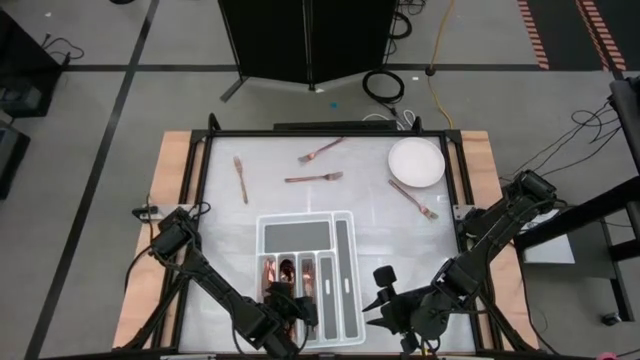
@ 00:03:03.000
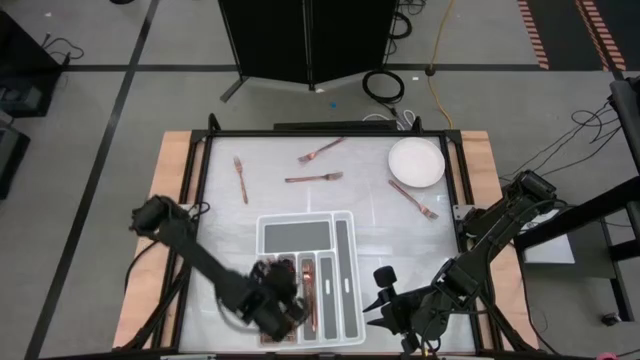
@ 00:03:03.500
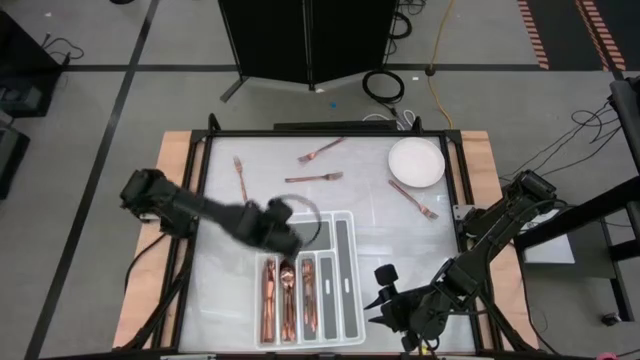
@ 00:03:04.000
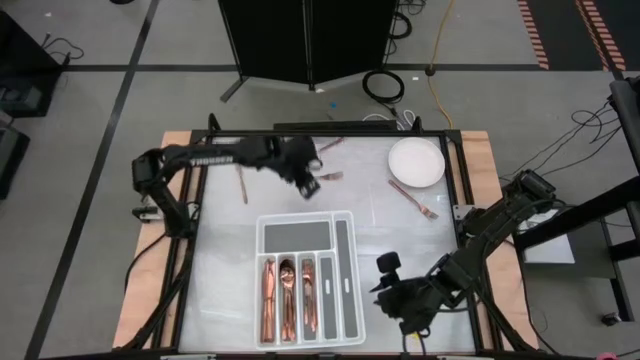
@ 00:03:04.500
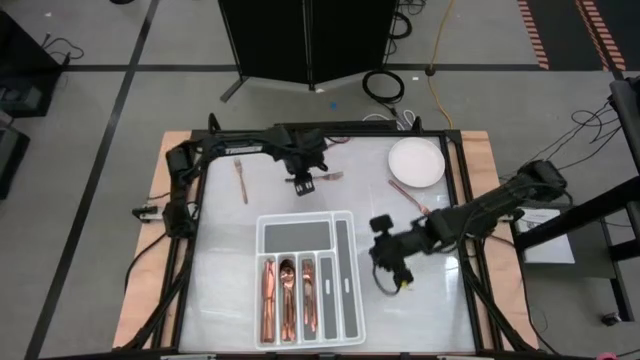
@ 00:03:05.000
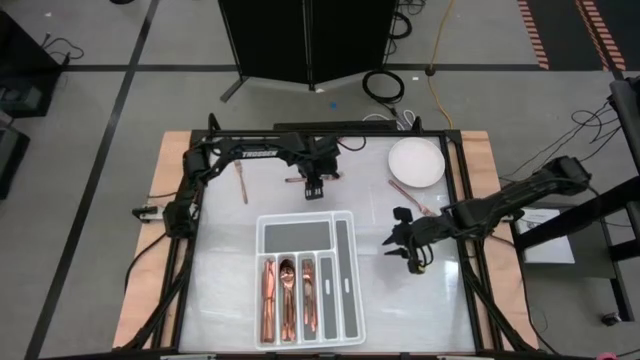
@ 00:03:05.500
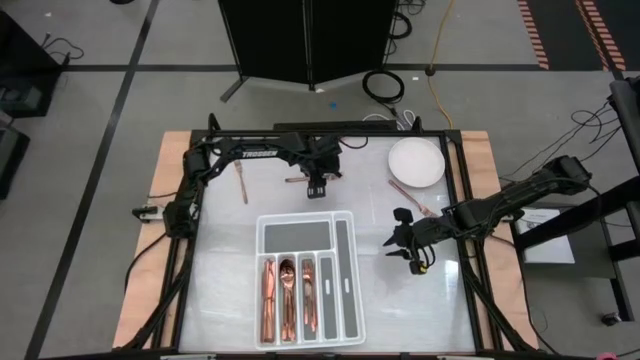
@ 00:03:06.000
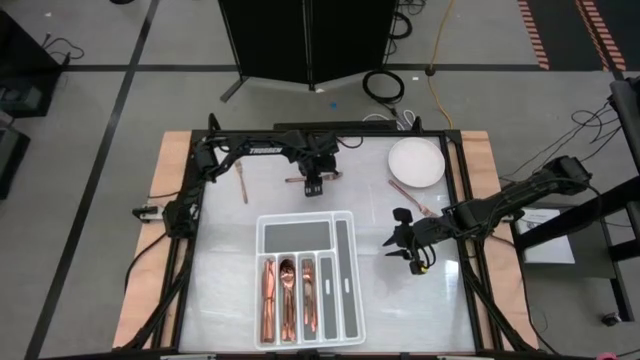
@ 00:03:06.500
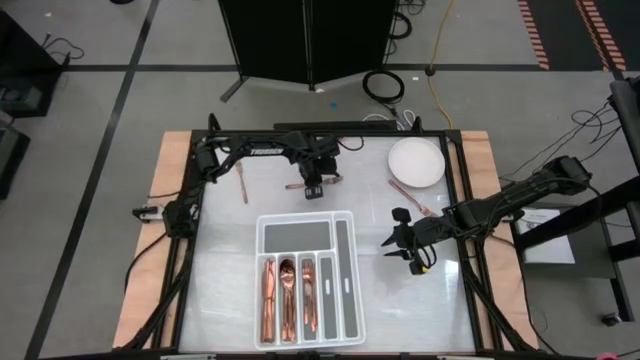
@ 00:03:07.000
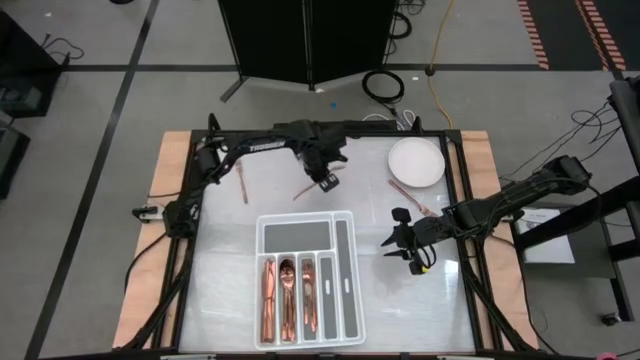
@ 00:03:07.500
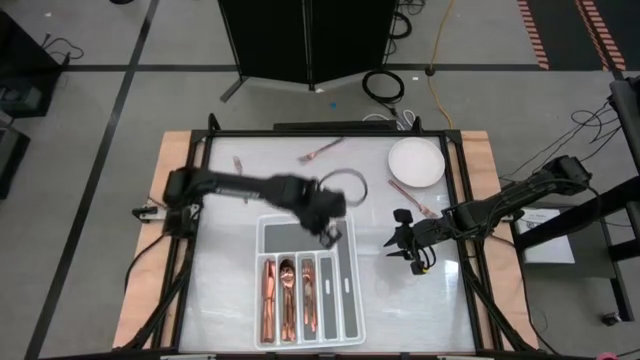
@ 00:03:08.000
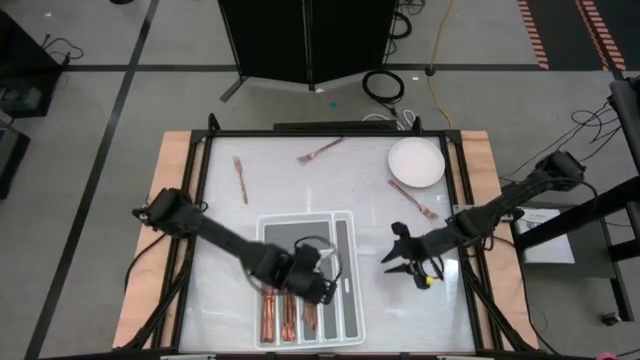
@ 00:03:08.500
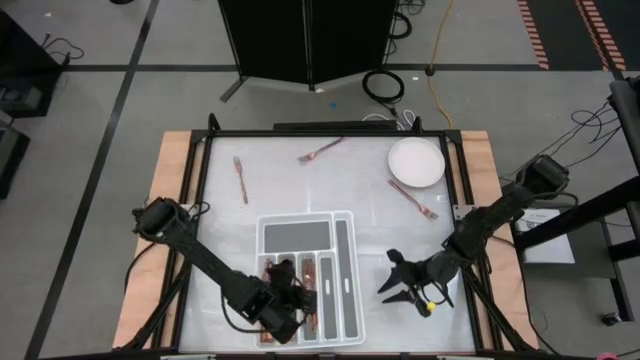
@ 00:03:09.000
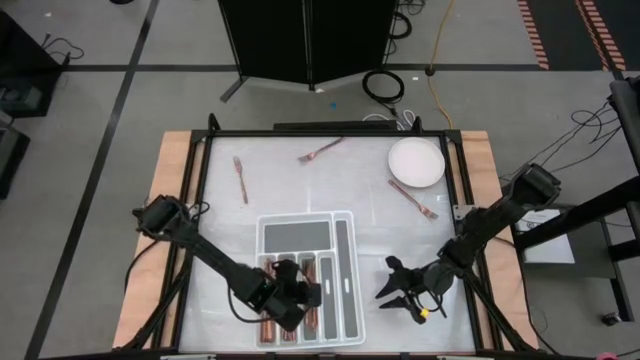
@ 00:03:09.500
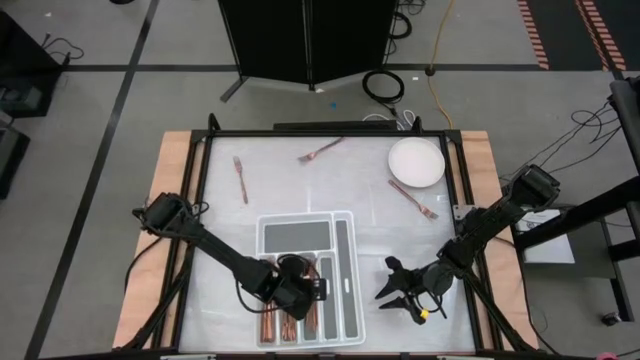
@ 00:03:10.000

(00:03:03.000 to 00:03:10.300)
Task: Sort silverware
Put the fork into the silverware tray

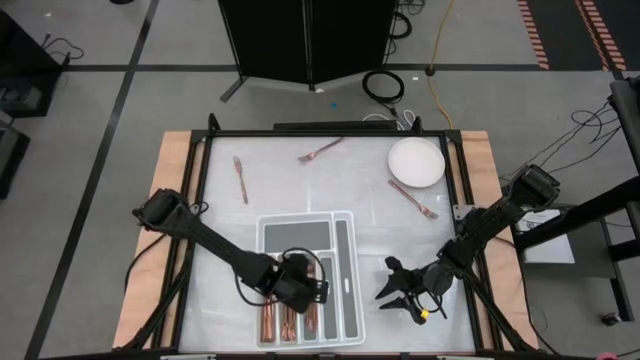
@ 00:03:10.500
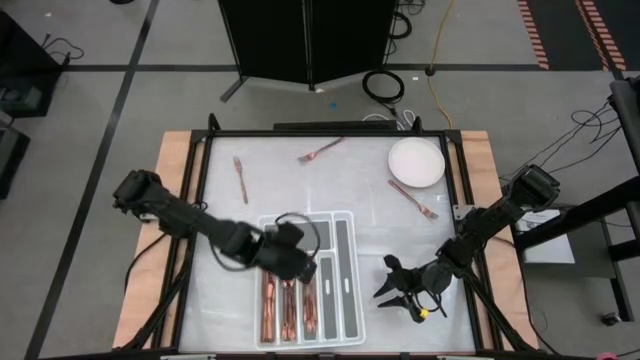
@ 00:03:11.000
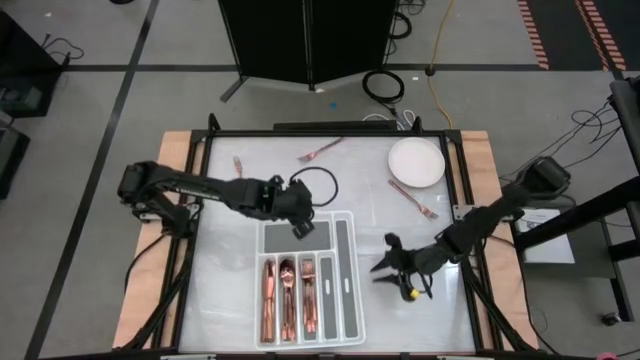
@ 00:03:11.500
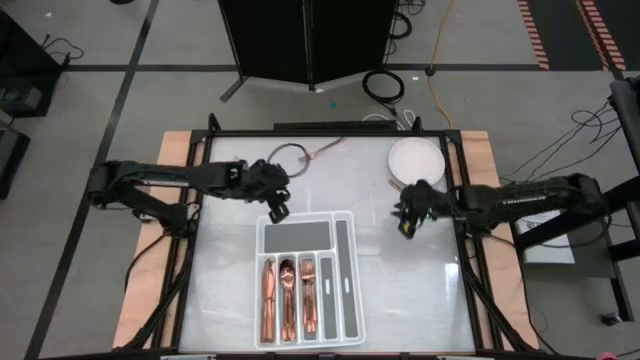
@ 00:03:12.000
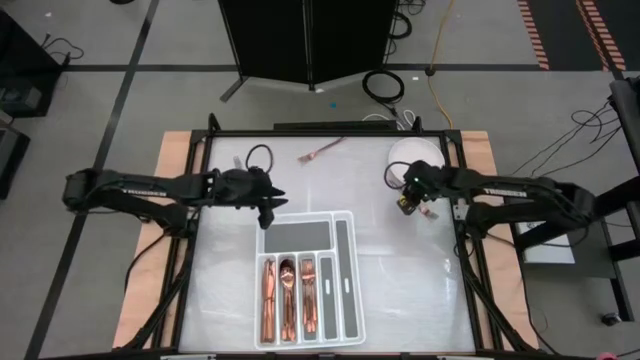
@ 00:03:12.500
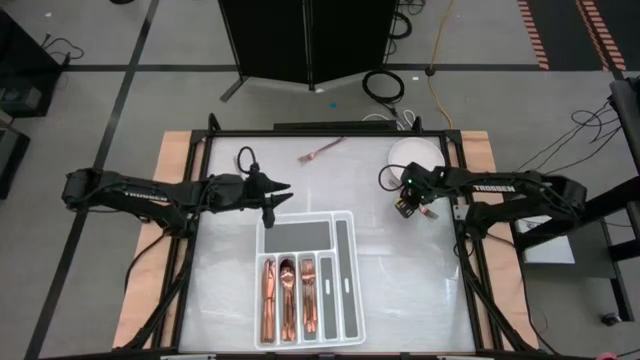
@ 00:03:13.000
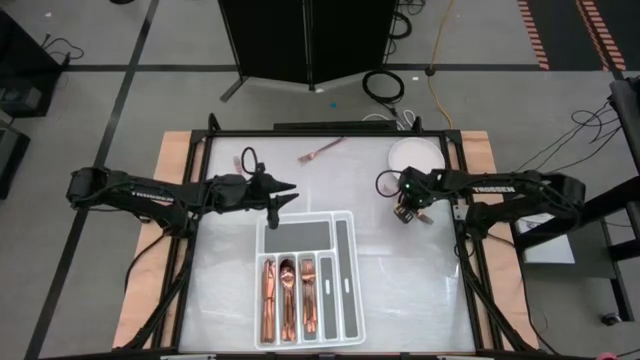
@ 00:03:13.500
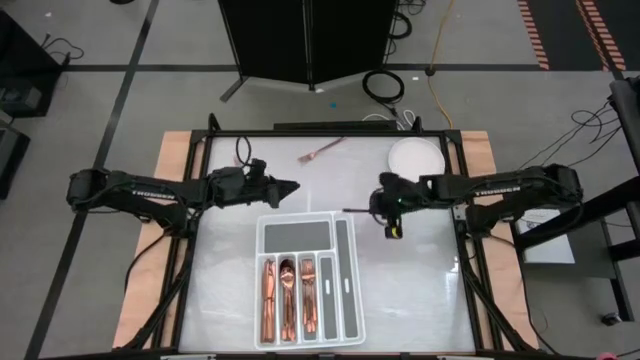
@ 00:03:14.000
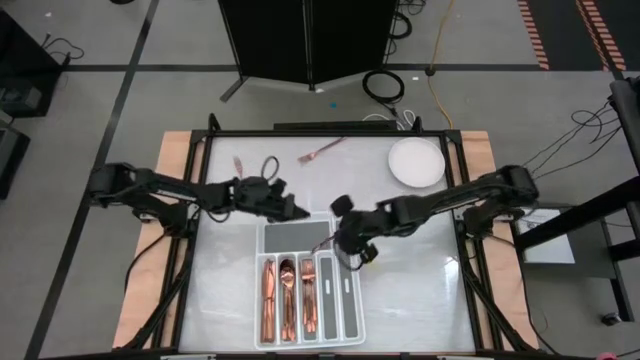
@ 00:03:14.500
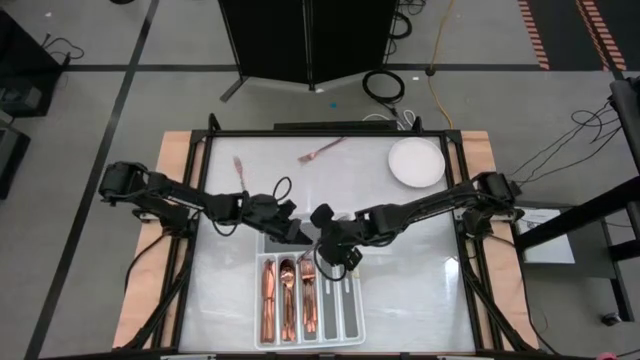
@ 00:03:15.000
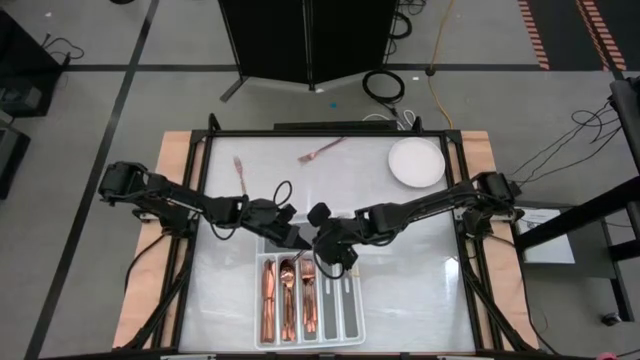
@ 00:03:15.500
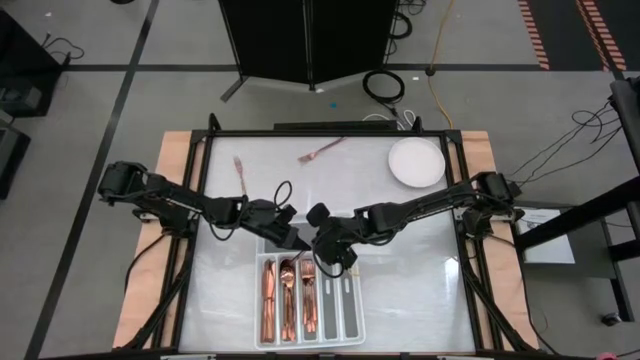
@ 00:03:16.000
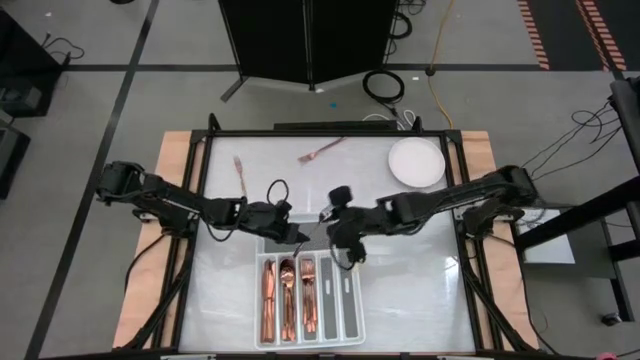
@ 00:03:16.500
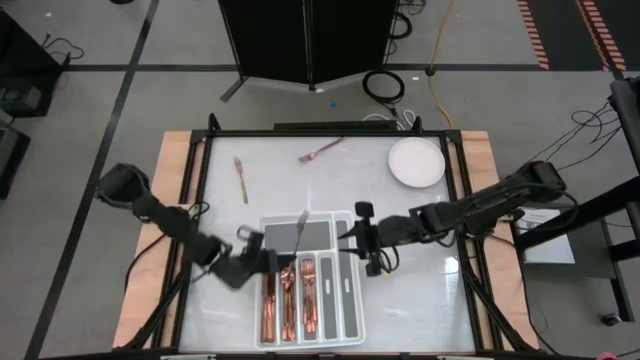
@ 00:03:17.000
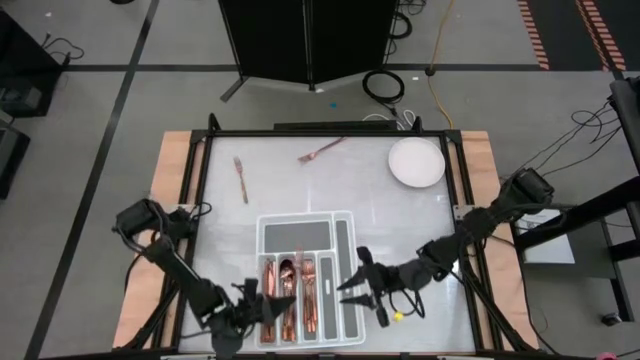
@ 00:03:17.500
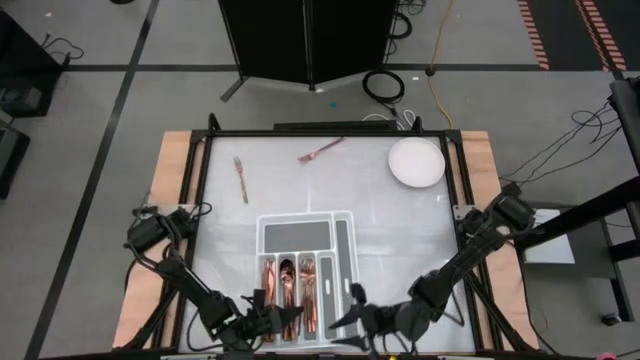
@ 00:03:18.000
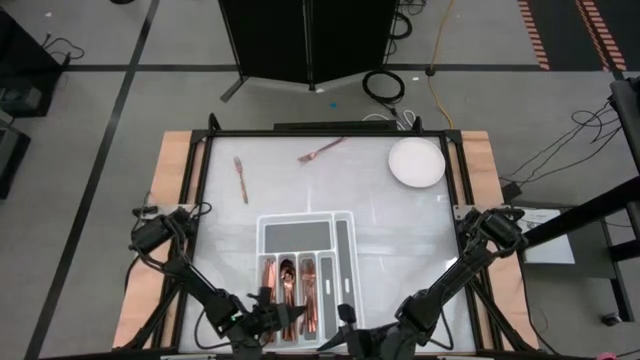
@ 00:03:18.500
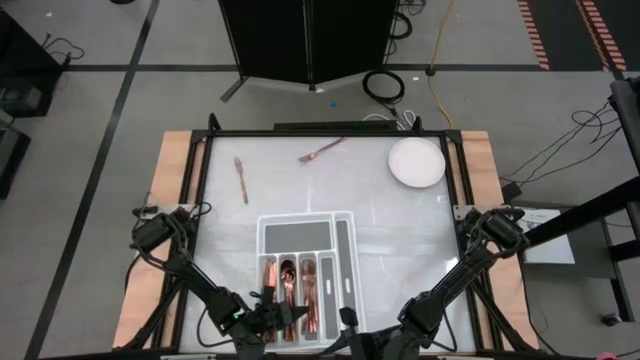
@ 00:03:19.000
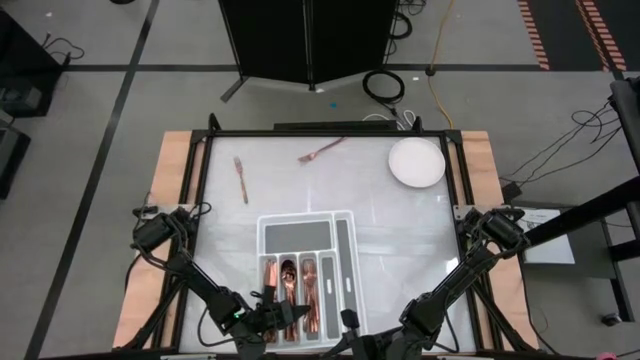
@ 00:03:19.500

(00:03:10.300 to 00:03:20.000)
Put the right fork into the silverware tray
